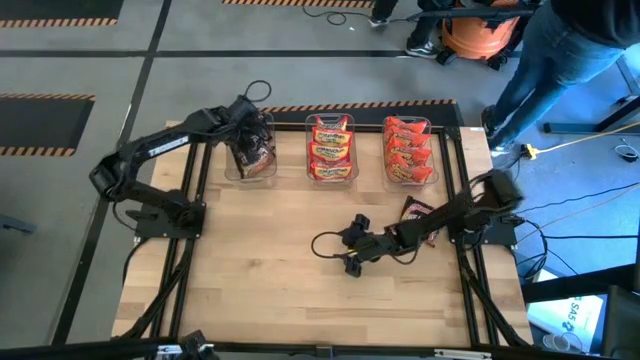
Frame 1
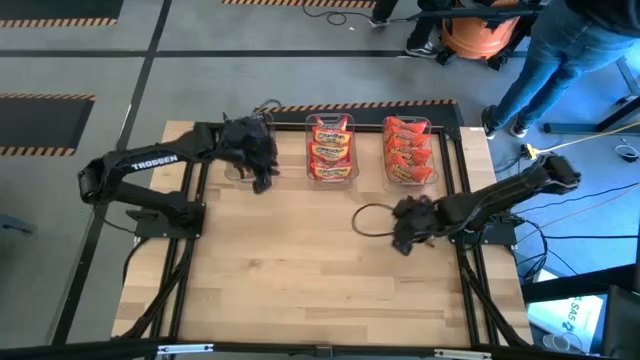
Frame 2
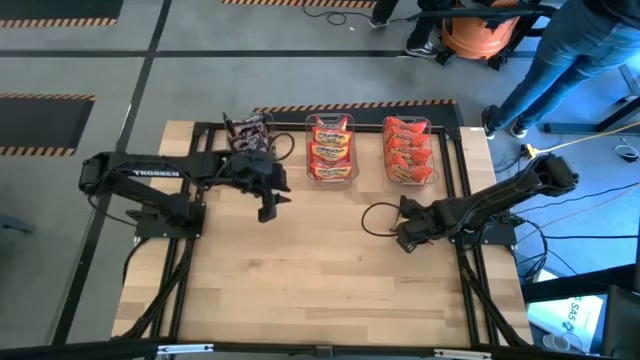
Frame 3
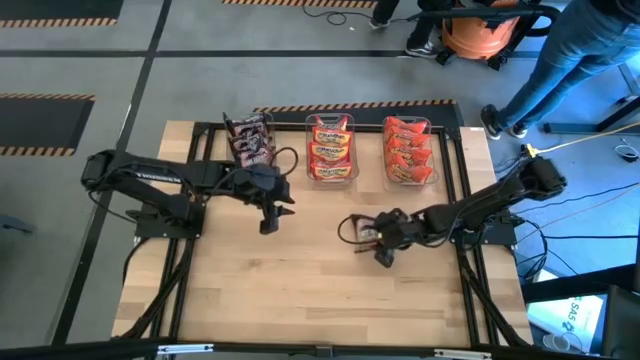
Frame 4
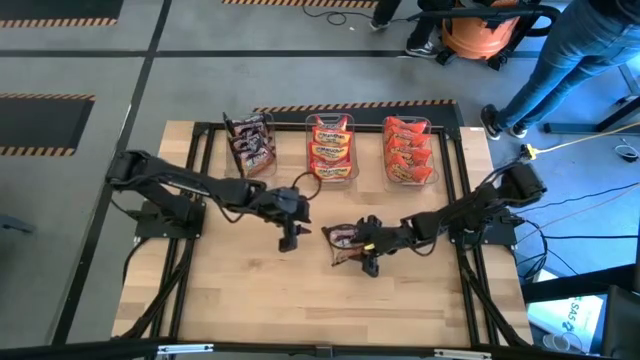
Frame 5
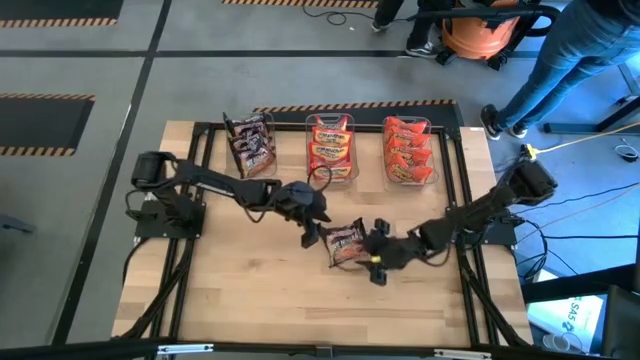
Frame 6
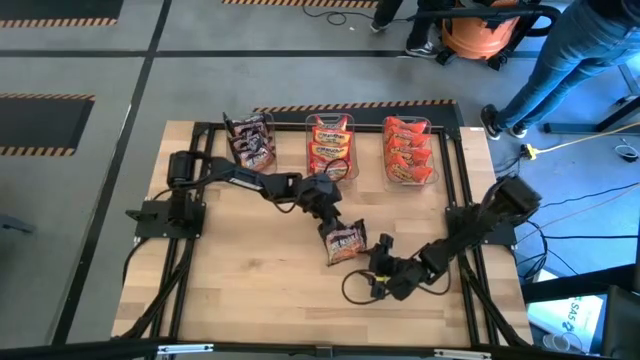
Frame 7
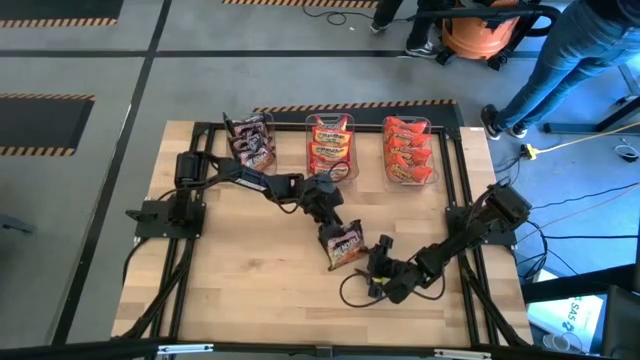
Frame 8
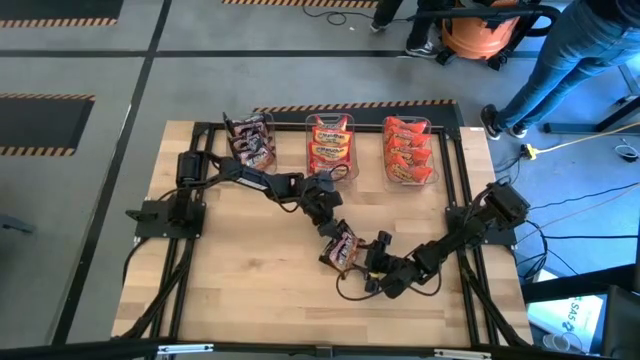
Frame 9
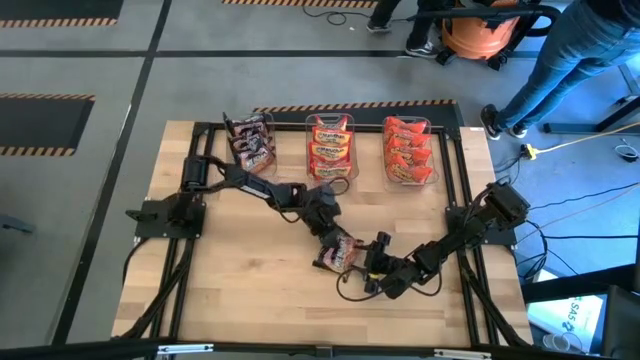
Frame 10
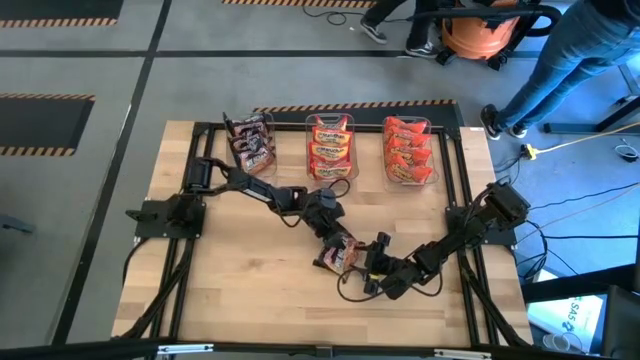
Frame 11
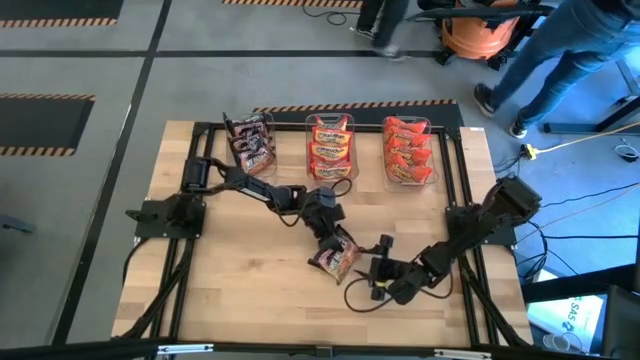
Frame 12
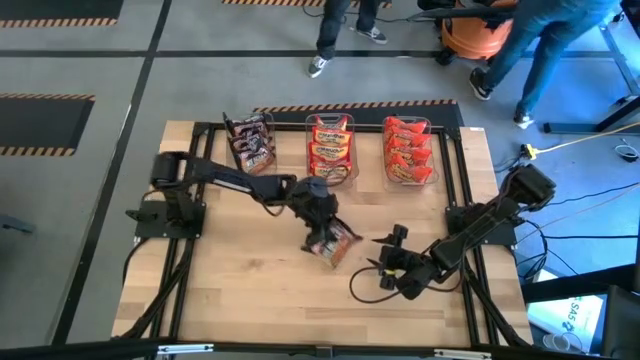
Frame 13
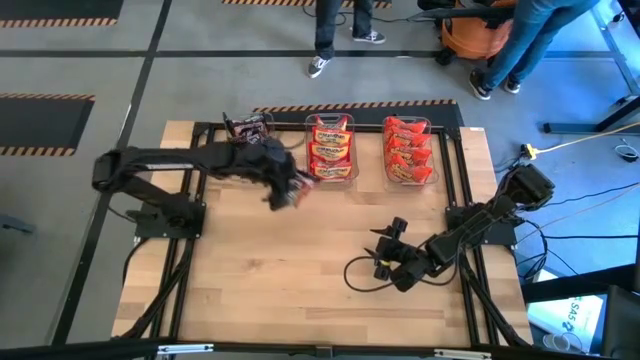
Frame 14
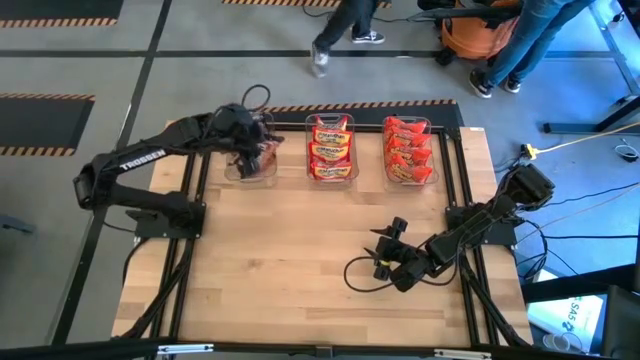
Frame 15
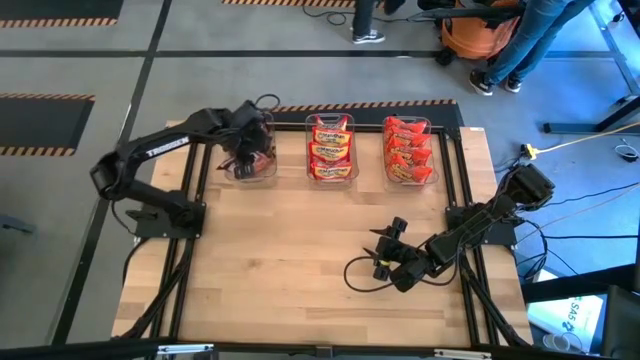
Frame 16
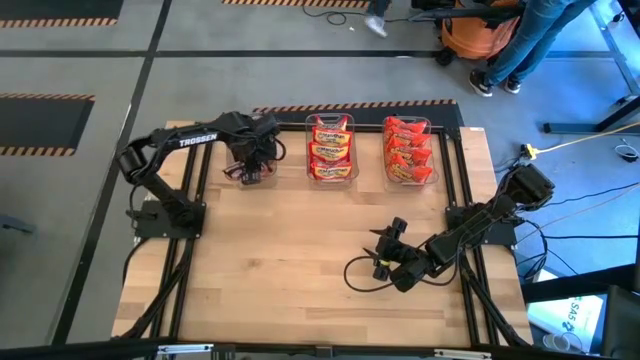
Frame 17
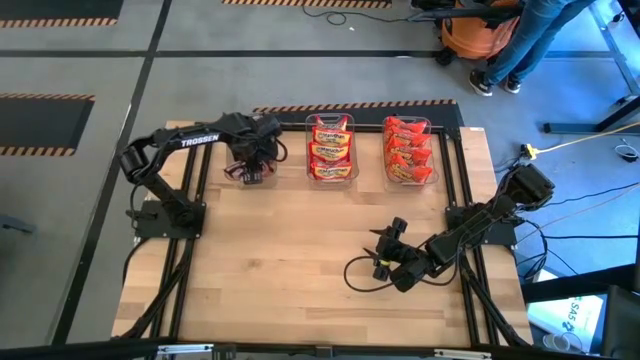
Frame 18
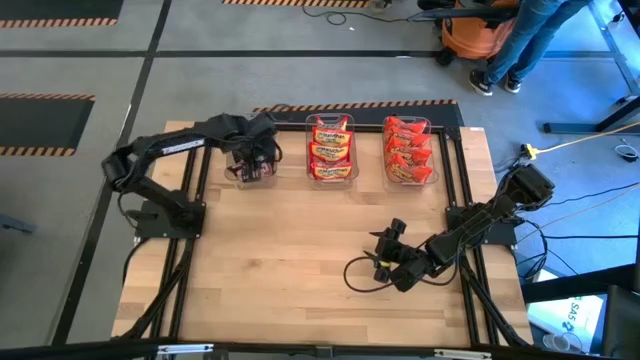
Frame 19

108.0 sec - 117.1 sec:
Task: Sort Maruchan noodles
Put the black noodle pack into the left transparent bin

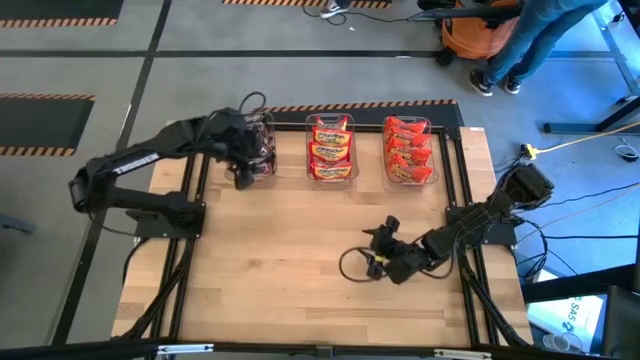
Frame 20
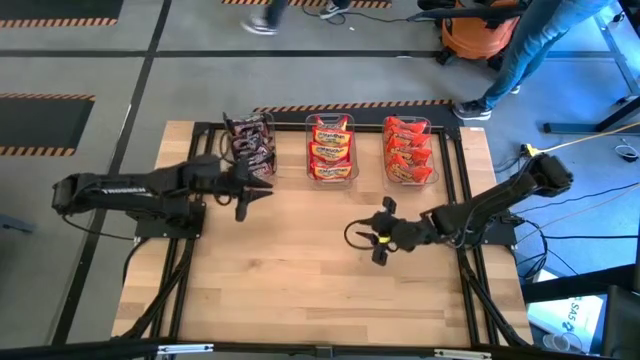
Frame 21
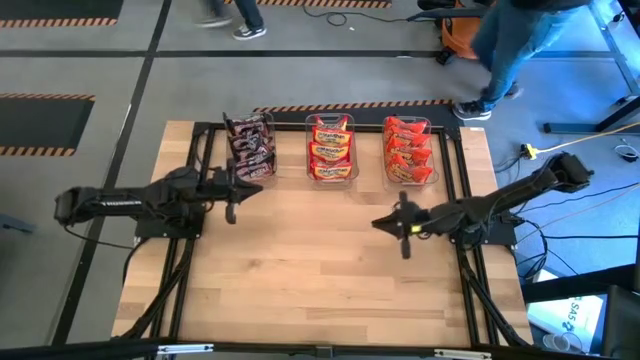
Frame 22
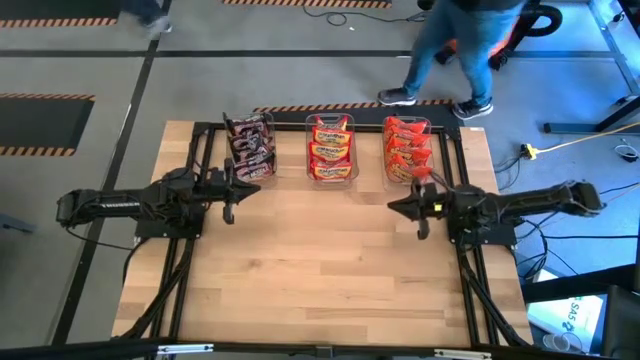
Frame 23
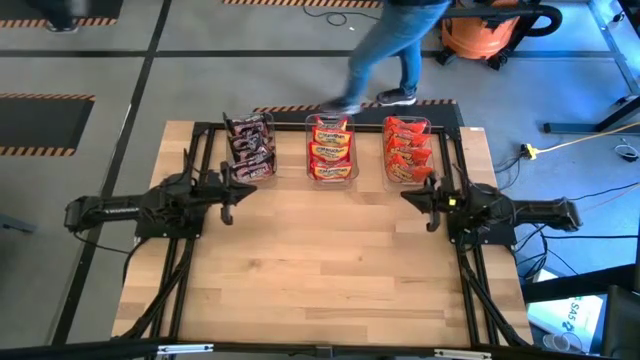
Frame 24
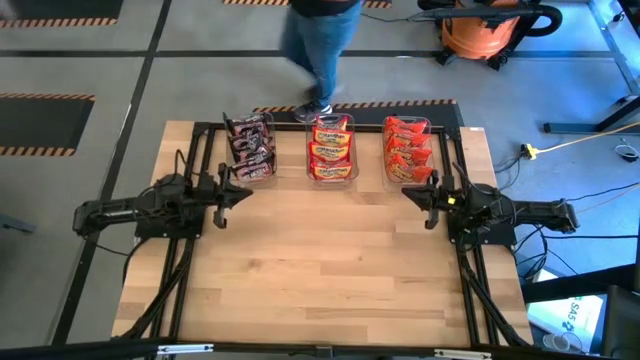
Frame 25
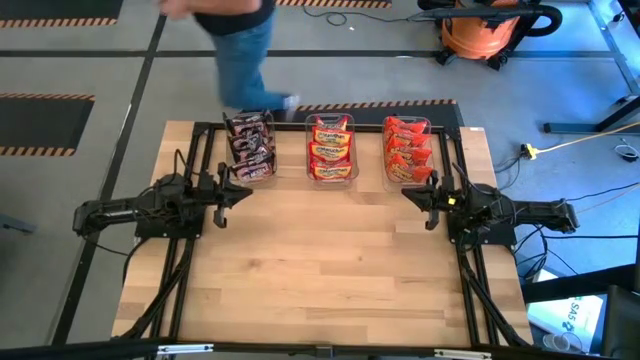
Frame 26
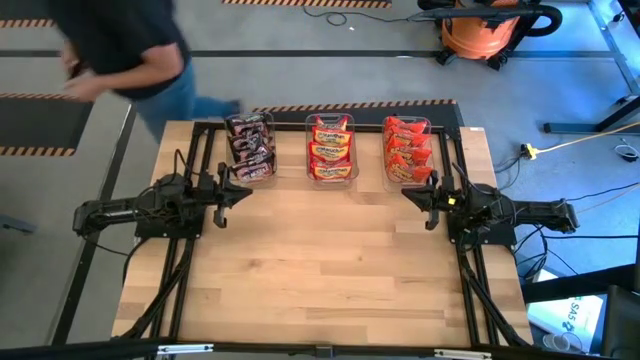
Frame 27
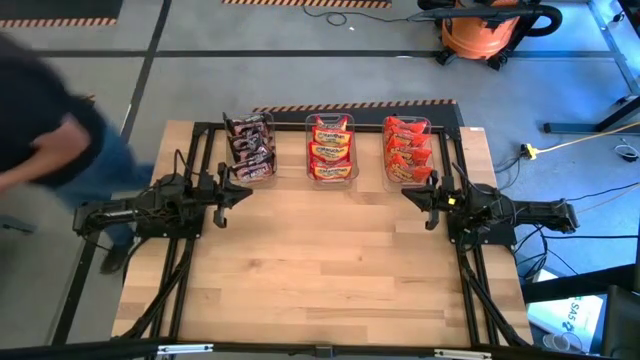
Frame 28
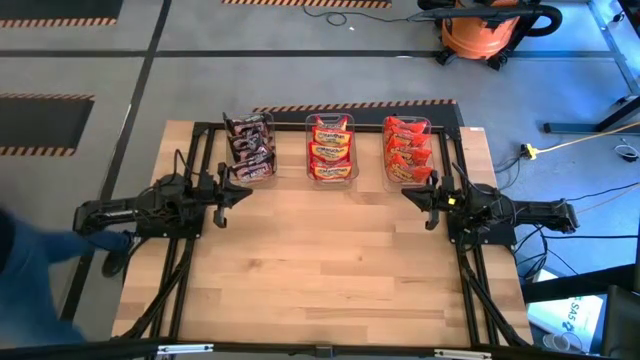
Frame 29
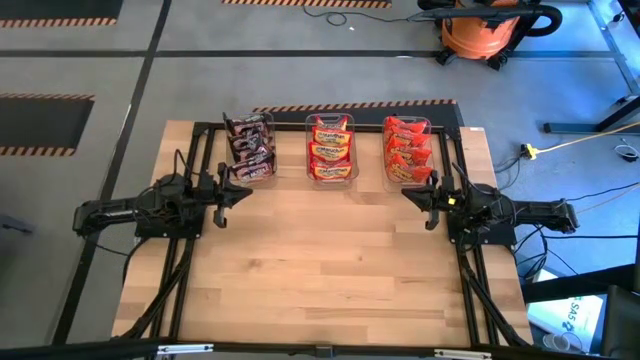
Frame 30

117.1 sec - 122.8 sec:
Return to Home Position

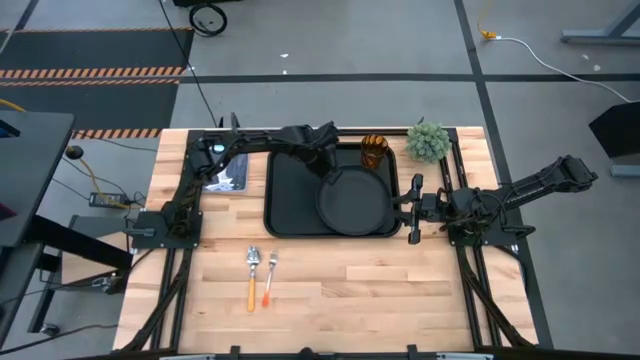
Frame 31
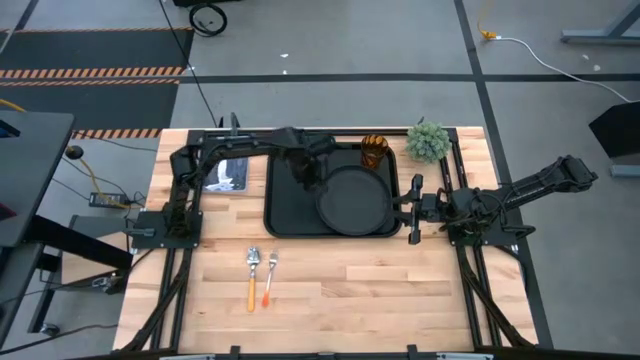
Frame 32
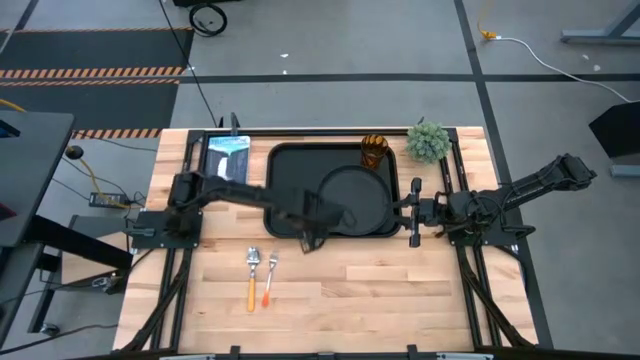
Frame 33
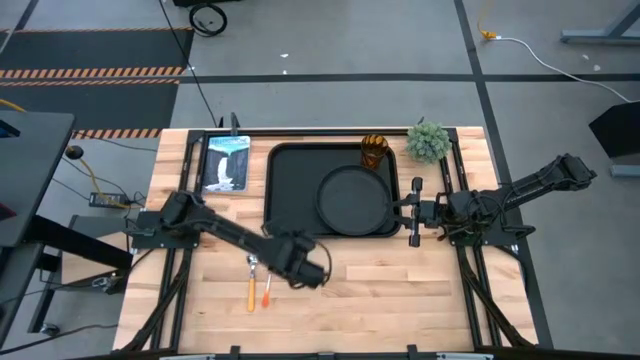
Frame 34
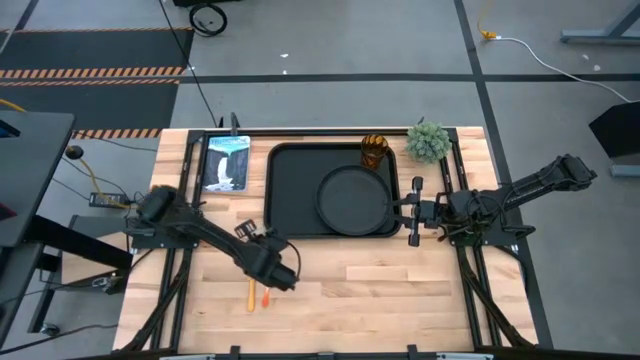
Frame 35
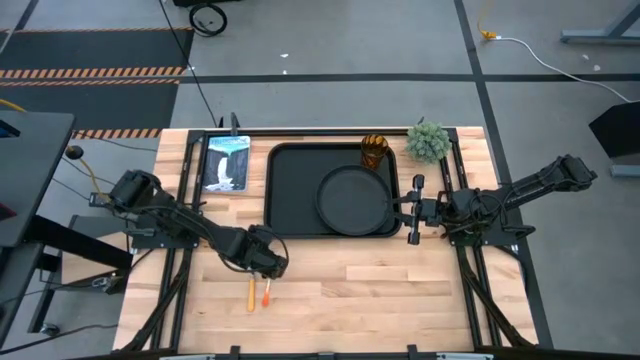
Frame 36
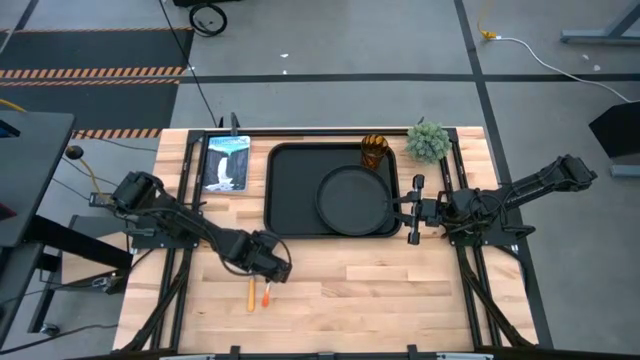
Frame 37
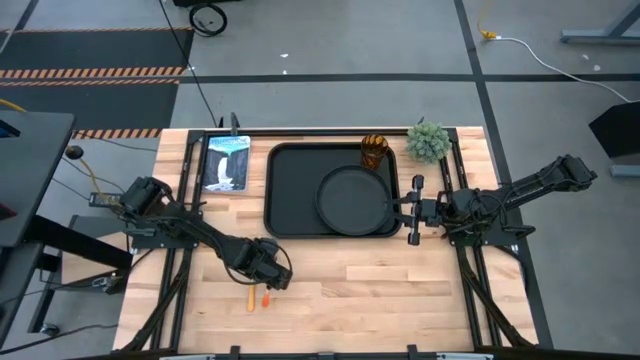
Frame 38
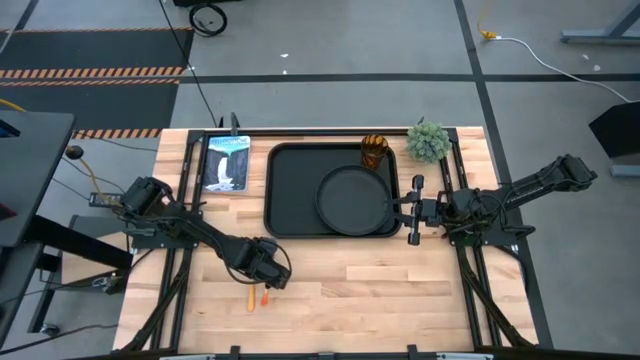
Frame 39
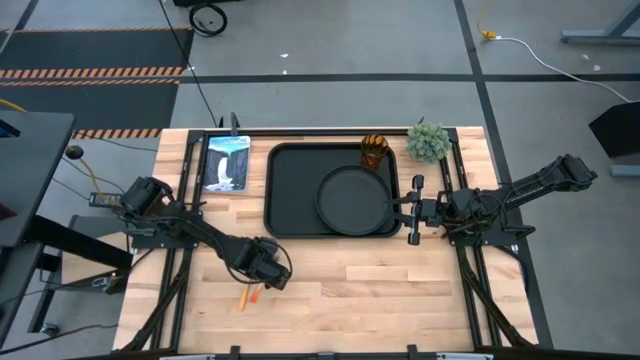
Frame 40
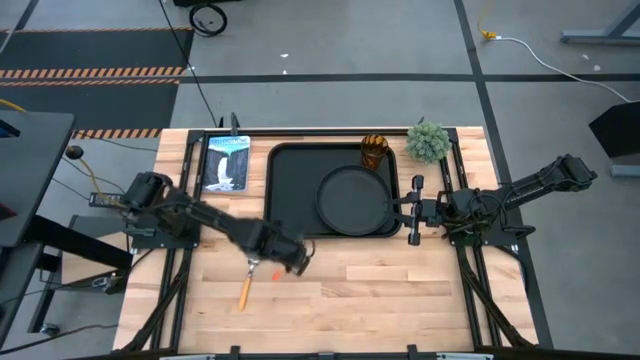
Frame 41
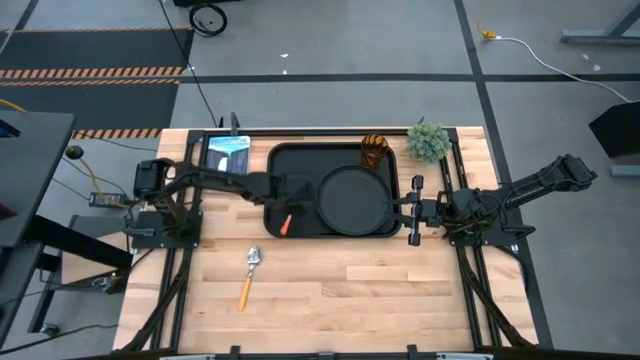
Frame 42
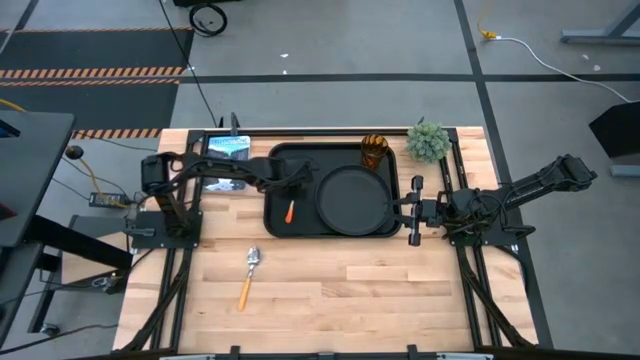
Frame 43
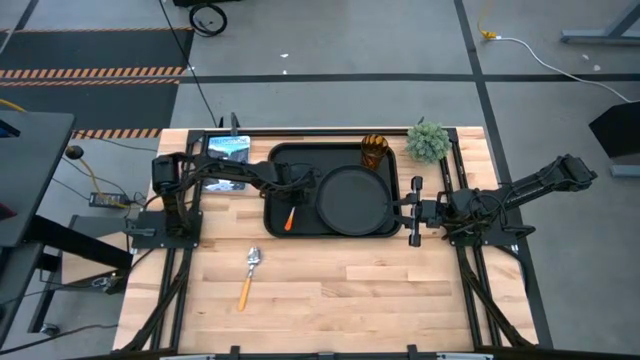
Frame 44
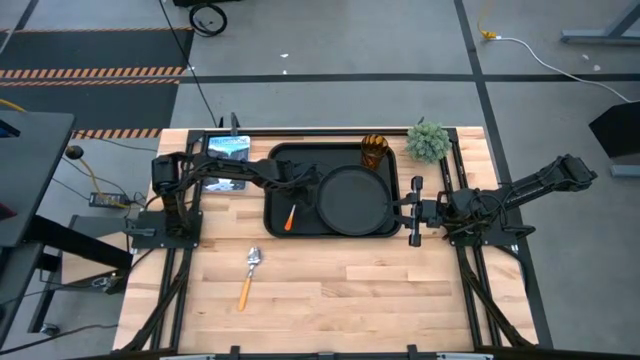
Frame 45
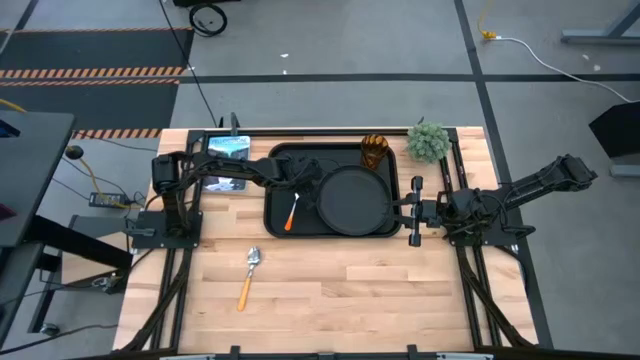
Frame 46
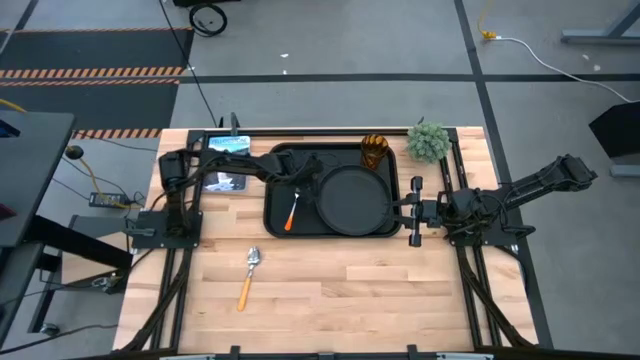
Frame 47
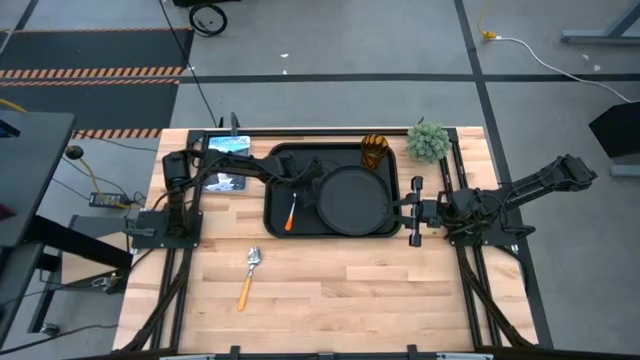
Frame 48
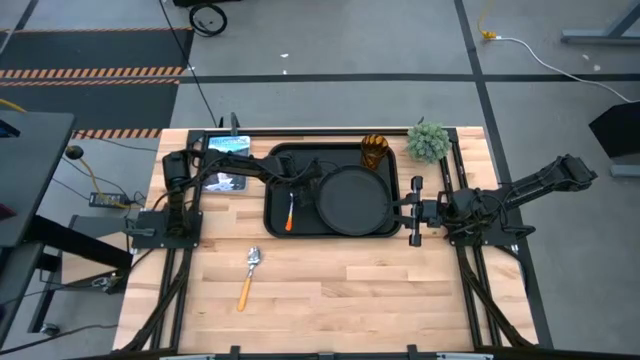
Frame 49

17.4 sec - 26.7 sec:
Task: Pick and place plate/cup/fork/spoon on tray
Put the orange fork on the black serving tray to the left of the black plate
